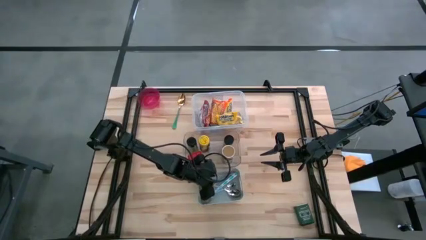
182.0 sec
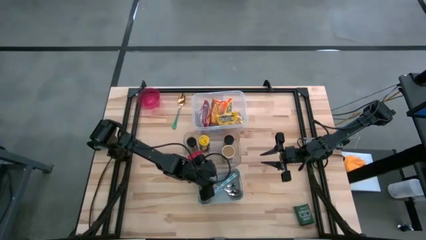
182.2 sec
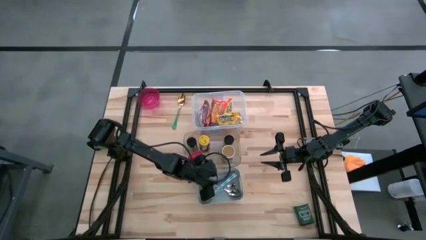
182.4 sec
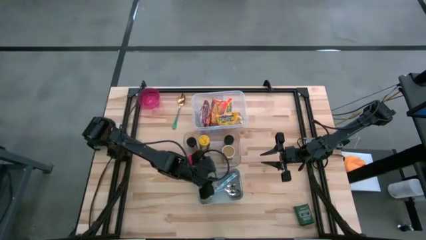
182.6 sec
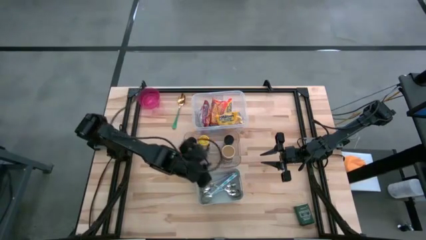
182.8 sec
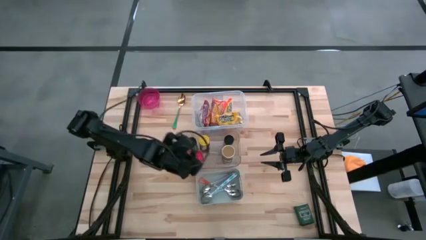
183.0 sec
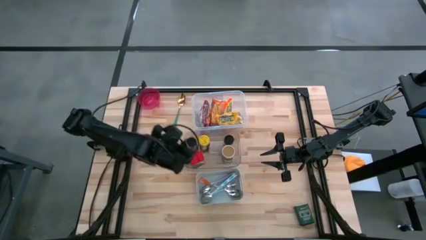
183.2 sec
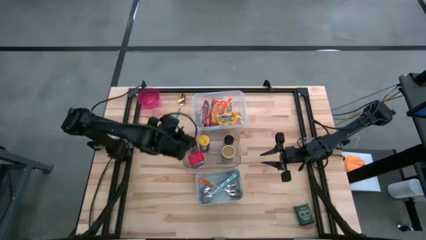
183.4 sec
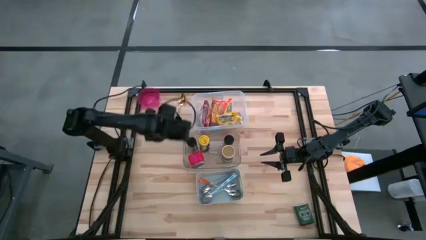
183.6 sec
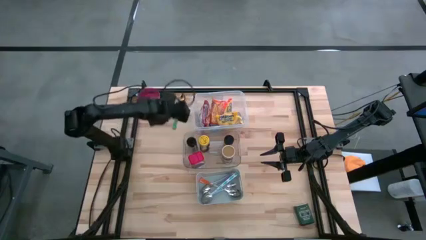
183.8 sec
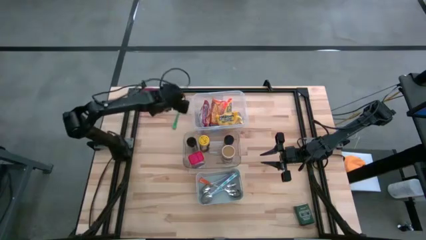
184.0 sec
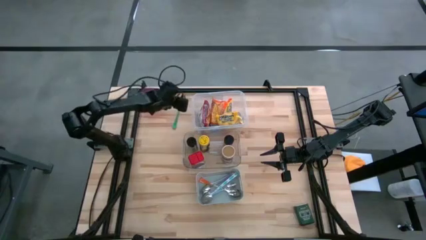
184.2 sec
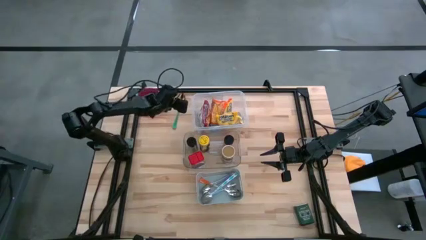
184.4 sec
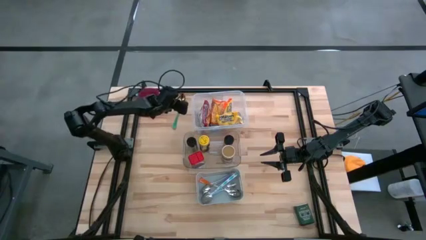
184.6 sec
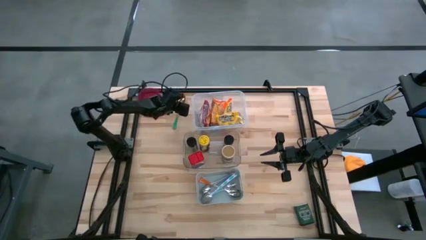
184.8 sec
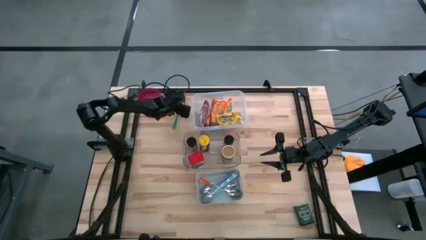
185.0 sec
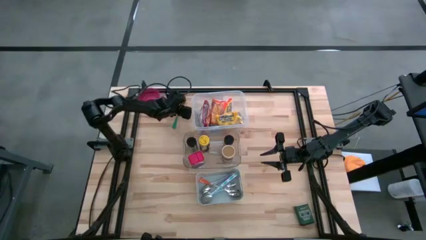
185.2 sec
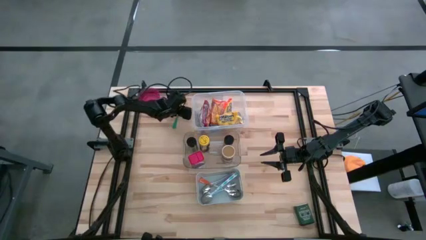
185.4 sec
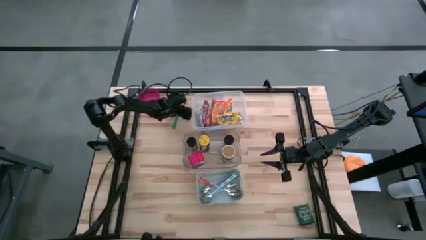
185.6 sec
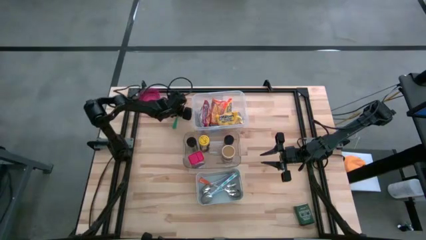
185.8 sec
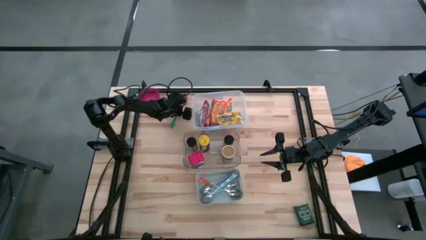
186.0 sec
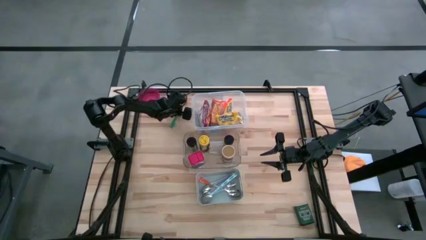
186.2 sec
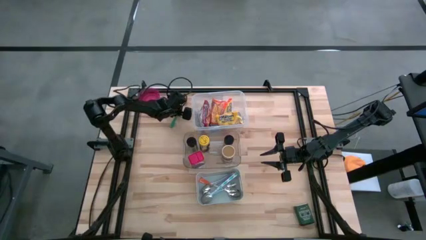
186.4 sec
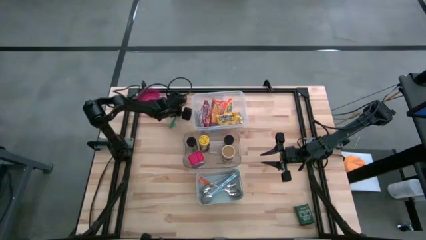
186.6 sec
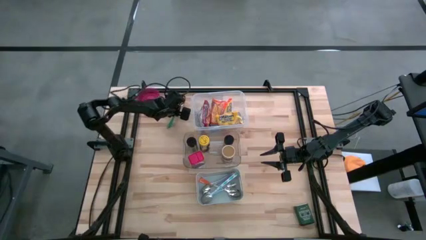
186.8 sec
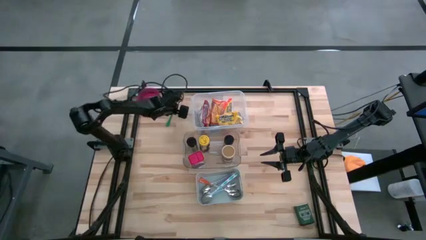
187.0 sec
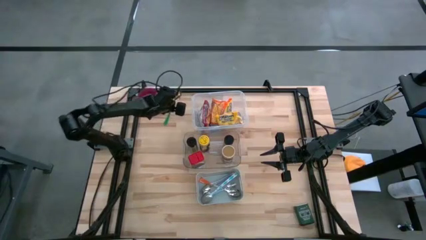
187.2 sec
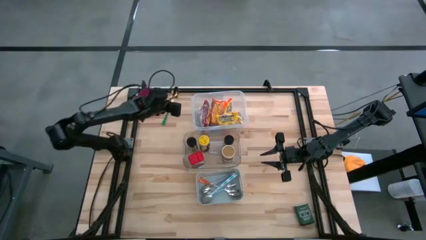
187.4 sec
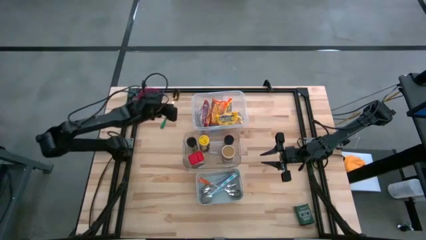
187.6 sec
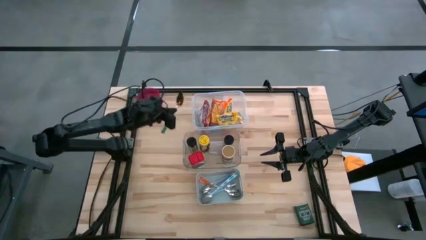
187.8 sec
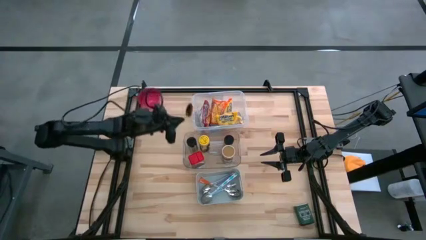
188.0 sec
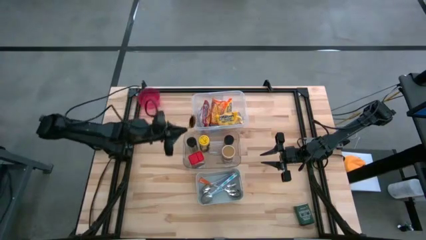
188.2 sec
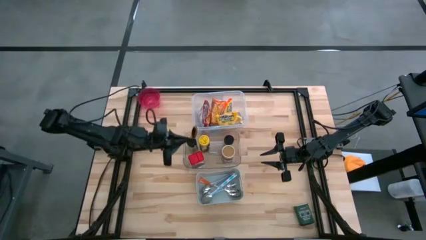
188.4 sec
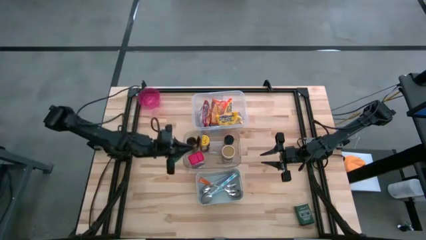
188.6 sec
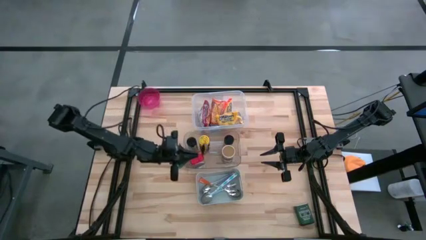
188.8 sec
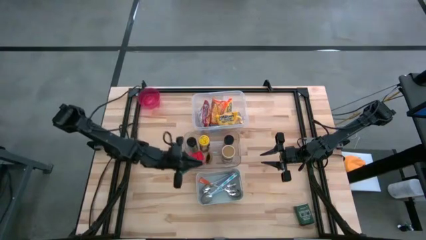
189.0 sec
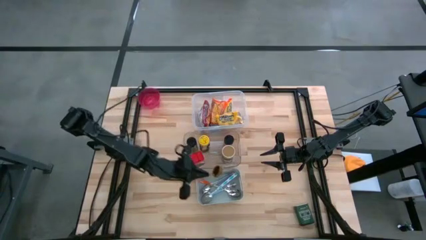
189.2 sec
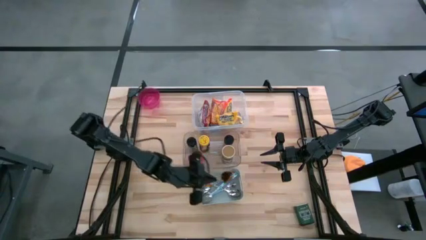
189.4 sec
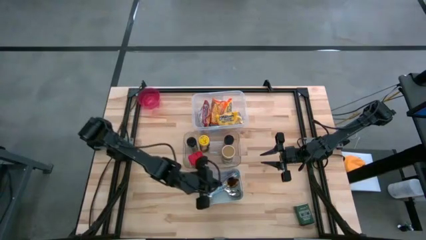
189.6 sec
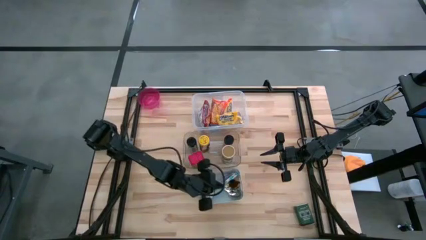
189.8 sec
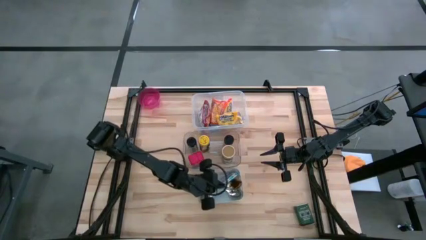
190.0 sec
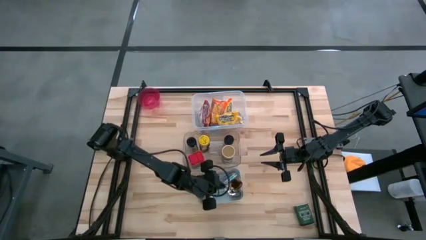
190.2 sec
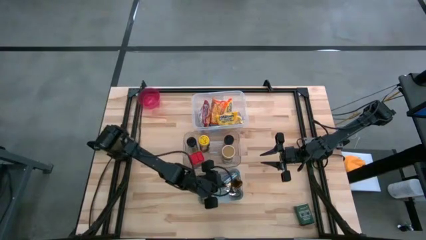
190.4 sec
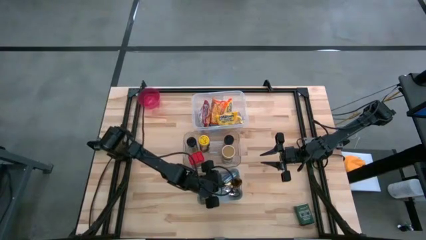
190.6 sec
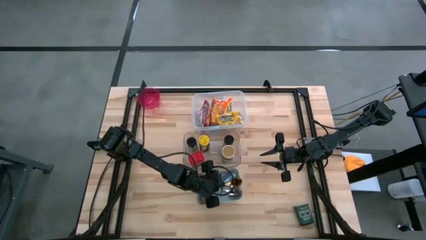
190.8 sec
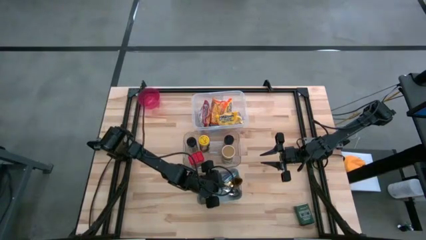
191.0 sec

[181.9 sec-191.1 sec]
Put the green spoon into the gray bin
